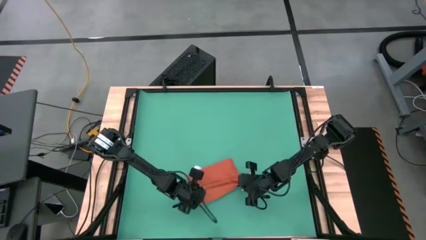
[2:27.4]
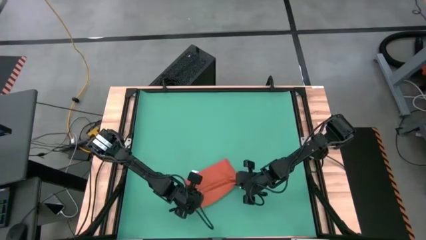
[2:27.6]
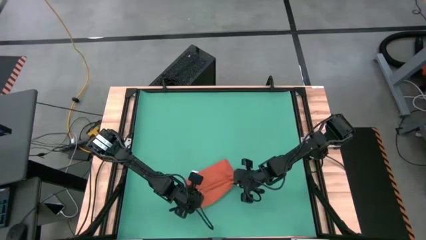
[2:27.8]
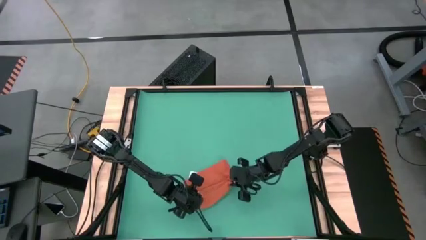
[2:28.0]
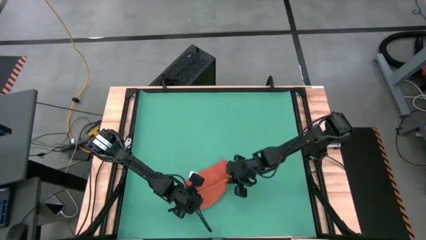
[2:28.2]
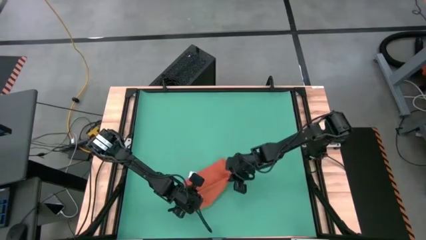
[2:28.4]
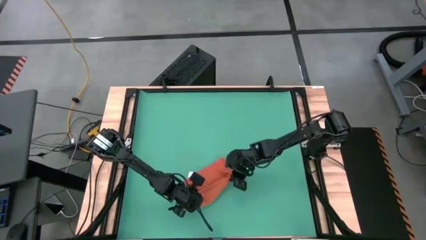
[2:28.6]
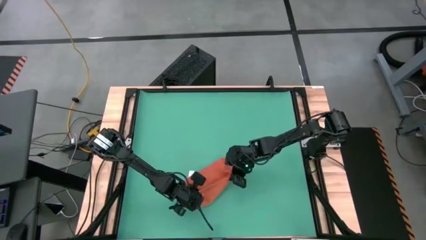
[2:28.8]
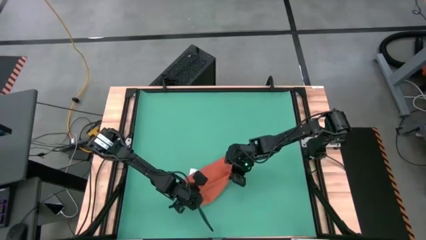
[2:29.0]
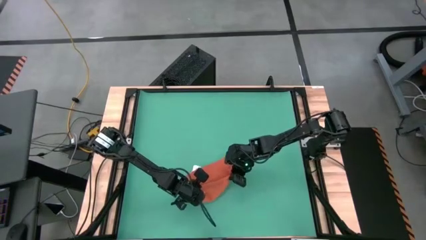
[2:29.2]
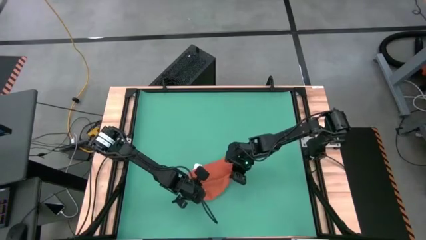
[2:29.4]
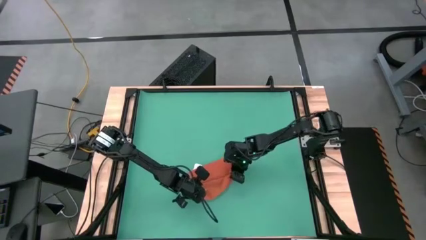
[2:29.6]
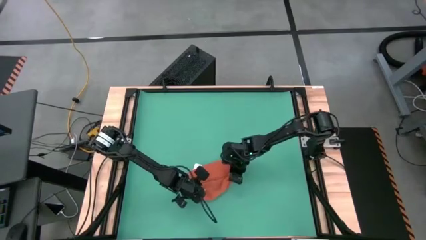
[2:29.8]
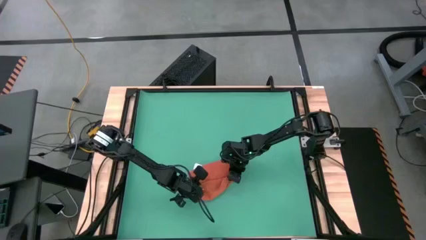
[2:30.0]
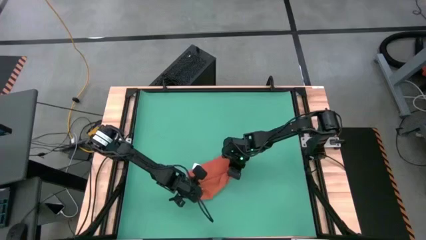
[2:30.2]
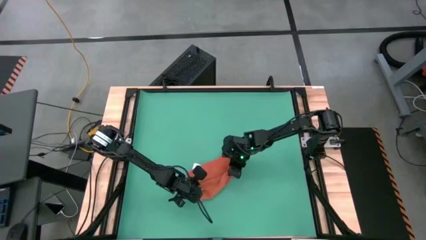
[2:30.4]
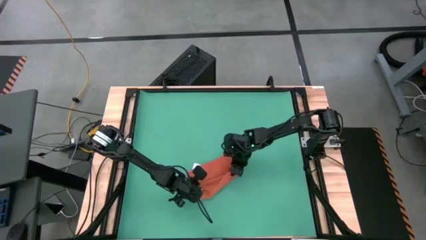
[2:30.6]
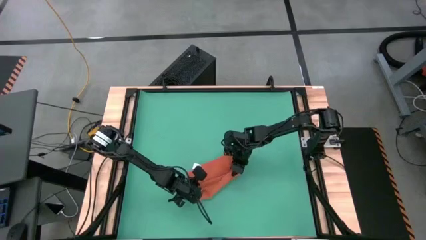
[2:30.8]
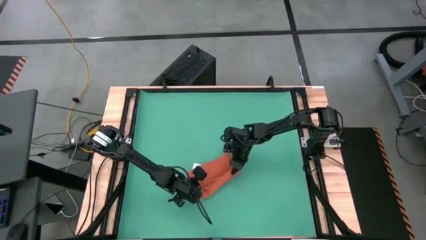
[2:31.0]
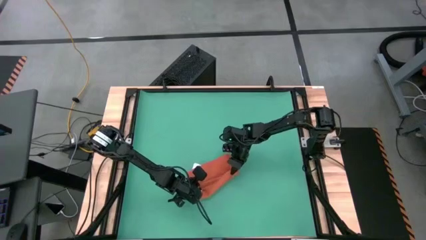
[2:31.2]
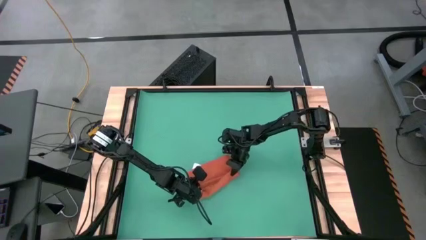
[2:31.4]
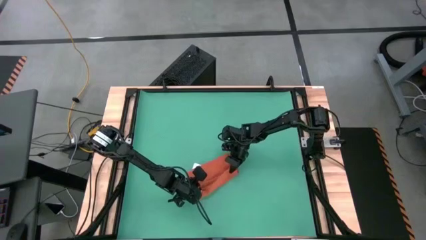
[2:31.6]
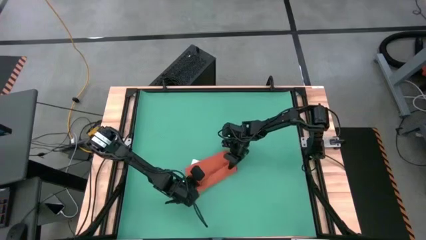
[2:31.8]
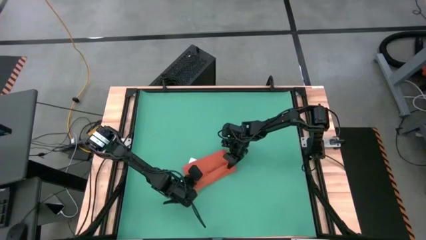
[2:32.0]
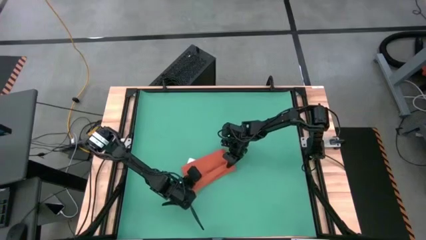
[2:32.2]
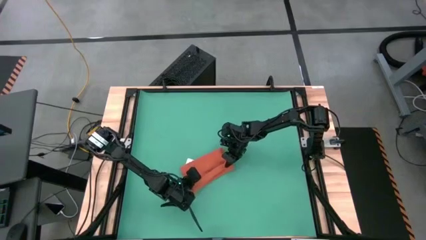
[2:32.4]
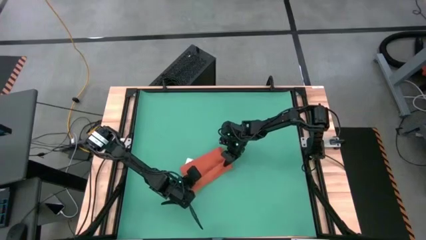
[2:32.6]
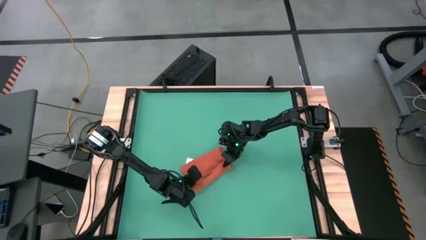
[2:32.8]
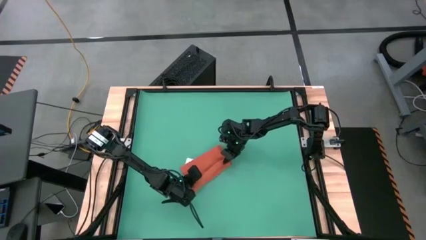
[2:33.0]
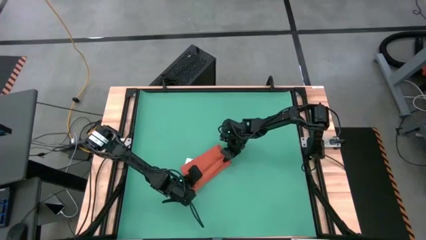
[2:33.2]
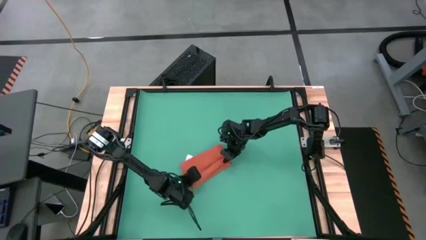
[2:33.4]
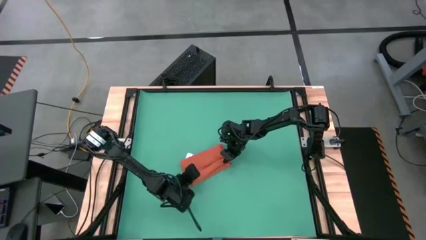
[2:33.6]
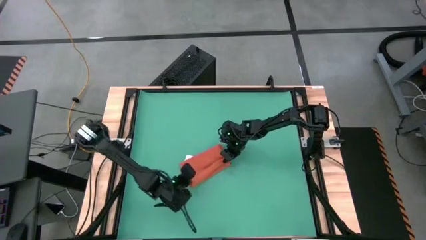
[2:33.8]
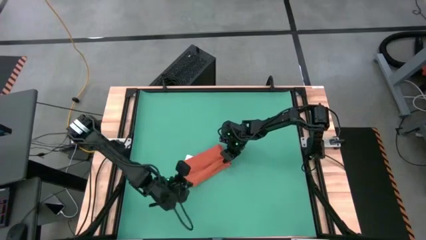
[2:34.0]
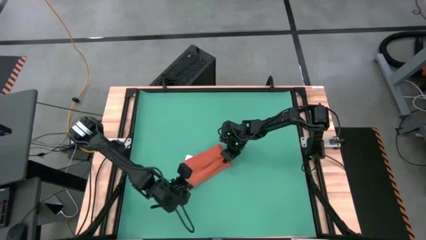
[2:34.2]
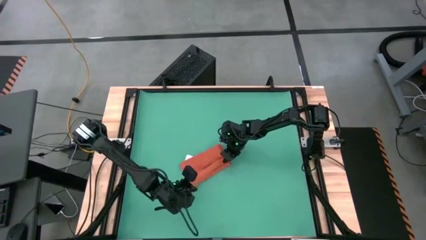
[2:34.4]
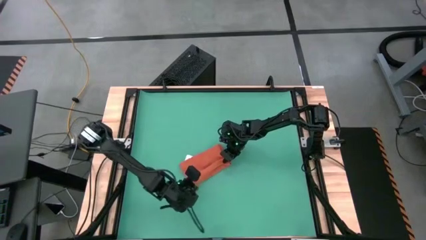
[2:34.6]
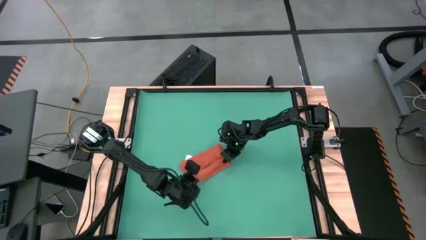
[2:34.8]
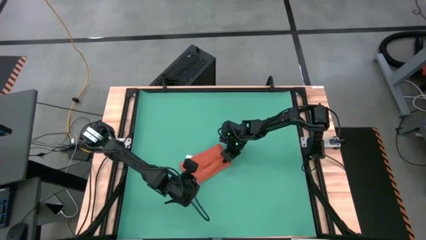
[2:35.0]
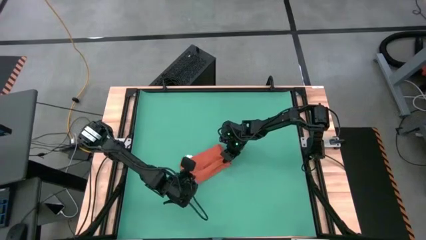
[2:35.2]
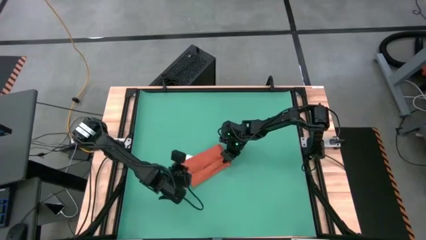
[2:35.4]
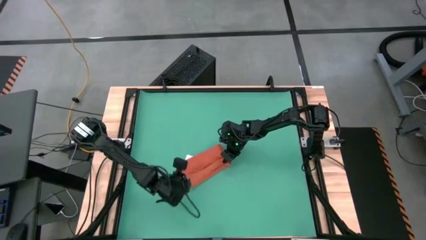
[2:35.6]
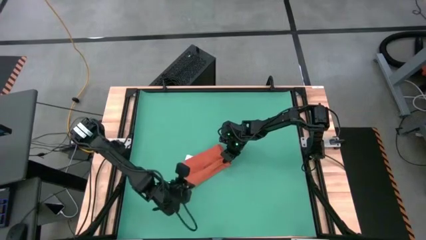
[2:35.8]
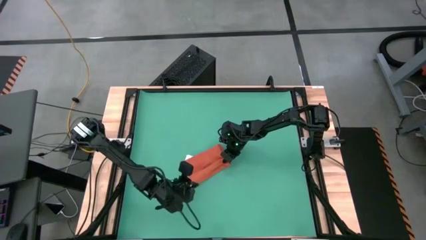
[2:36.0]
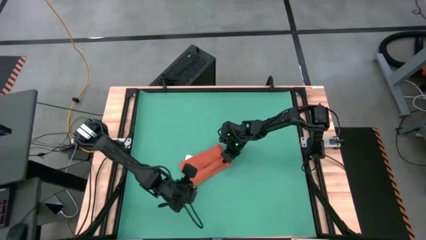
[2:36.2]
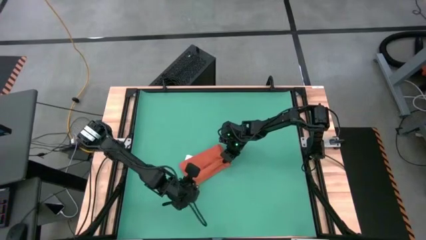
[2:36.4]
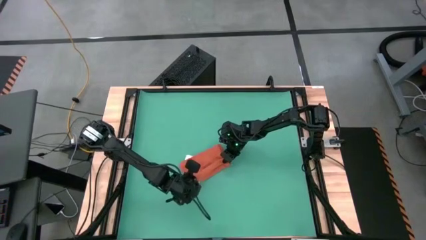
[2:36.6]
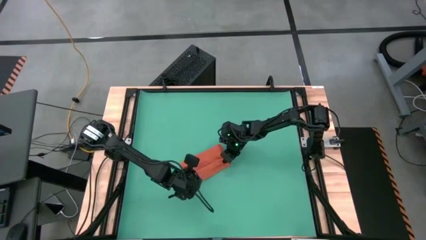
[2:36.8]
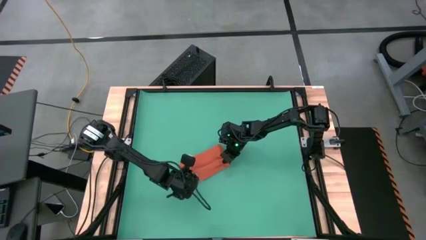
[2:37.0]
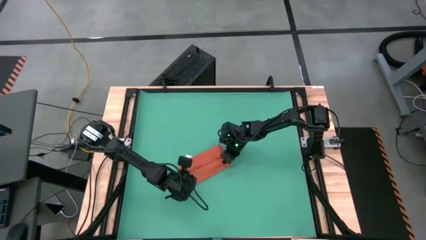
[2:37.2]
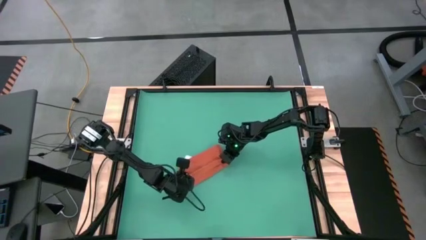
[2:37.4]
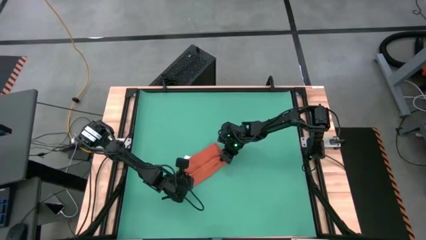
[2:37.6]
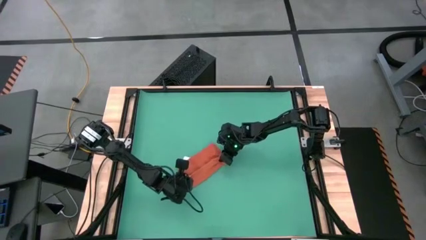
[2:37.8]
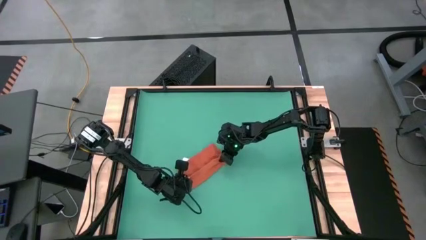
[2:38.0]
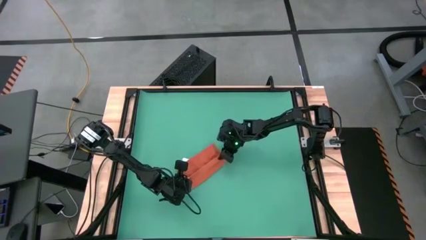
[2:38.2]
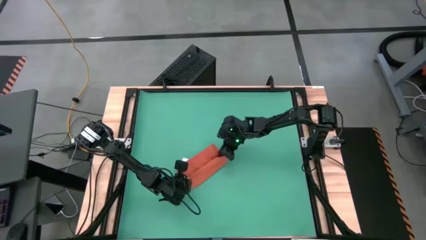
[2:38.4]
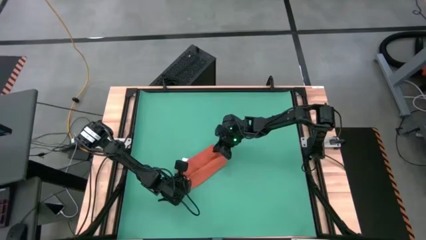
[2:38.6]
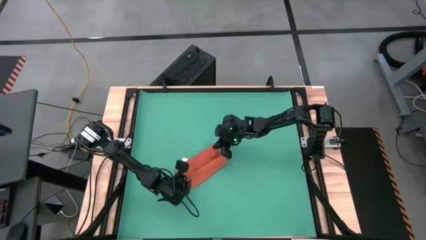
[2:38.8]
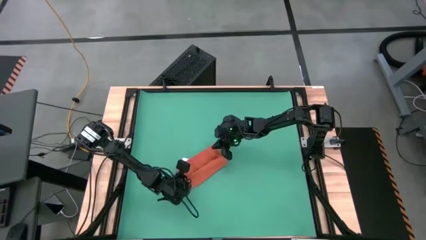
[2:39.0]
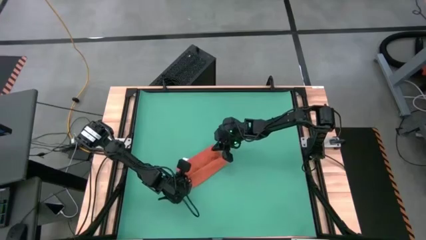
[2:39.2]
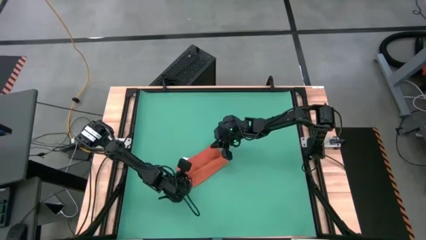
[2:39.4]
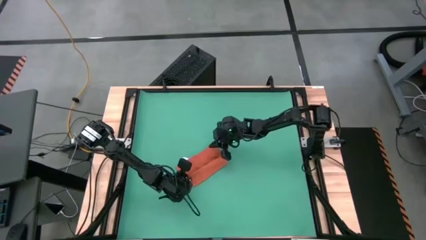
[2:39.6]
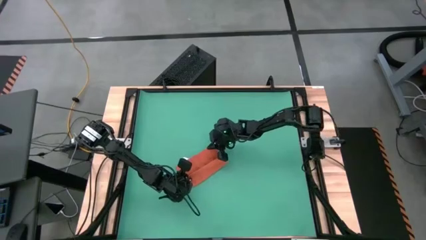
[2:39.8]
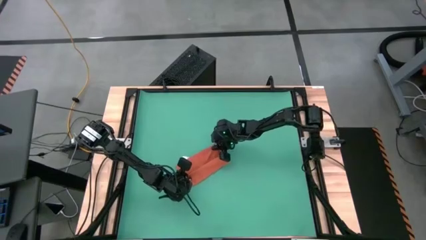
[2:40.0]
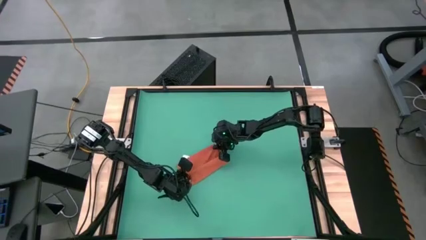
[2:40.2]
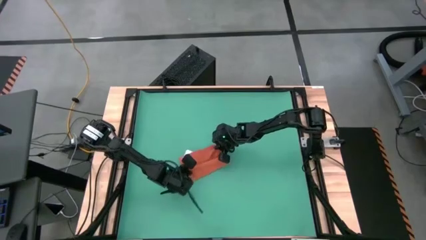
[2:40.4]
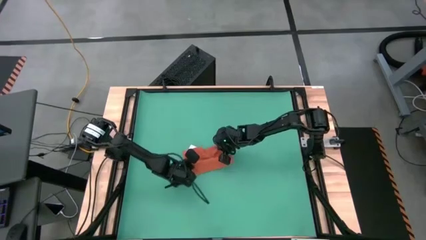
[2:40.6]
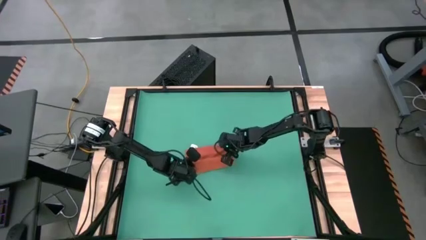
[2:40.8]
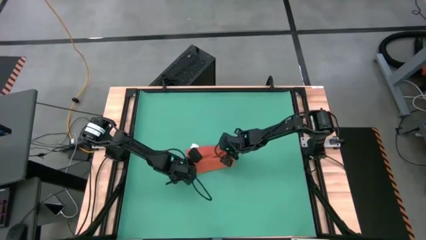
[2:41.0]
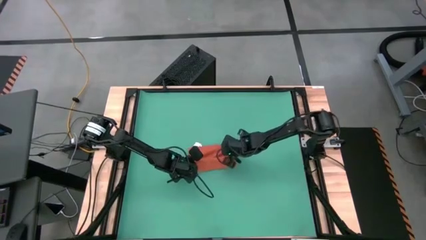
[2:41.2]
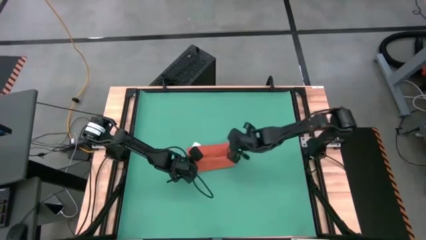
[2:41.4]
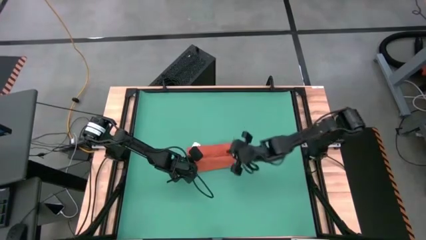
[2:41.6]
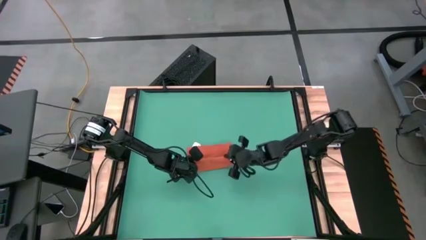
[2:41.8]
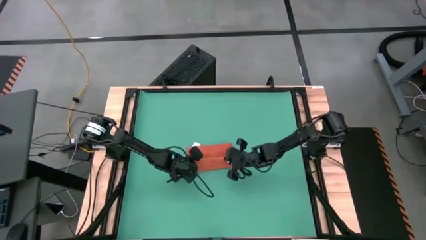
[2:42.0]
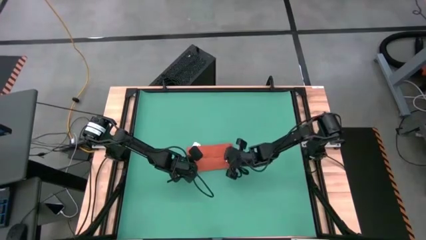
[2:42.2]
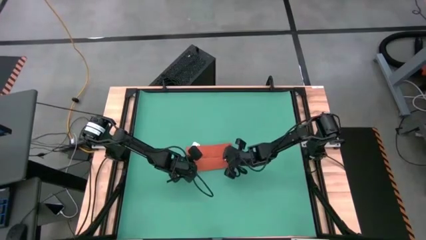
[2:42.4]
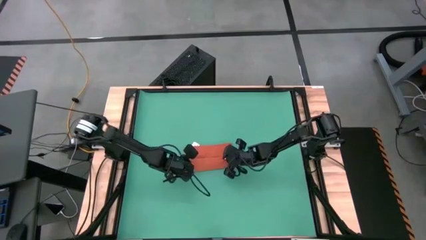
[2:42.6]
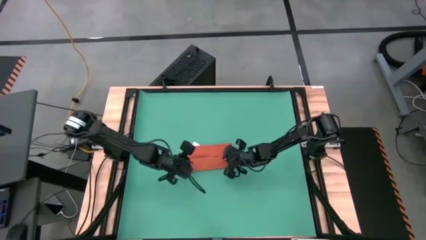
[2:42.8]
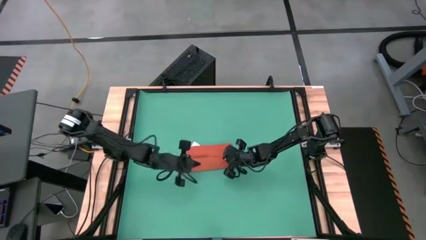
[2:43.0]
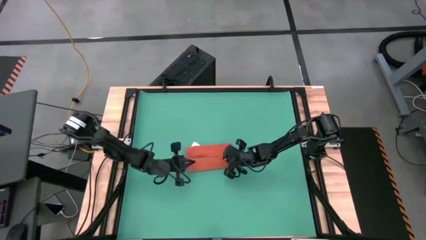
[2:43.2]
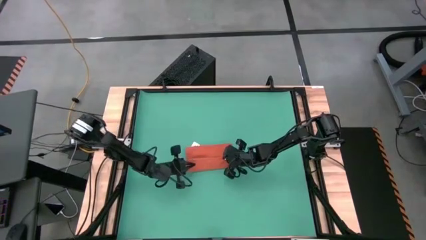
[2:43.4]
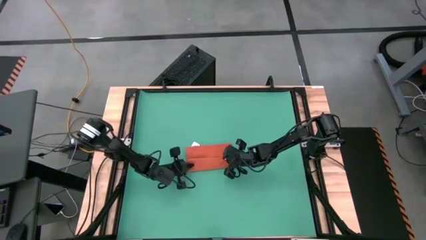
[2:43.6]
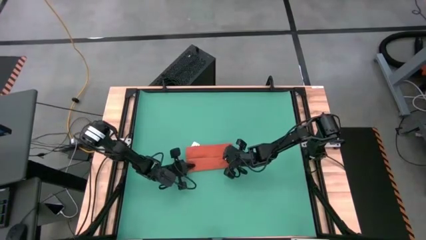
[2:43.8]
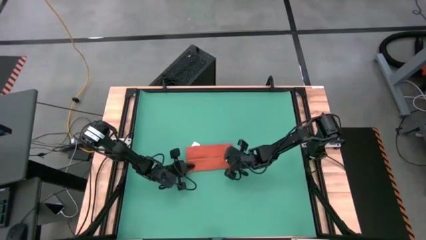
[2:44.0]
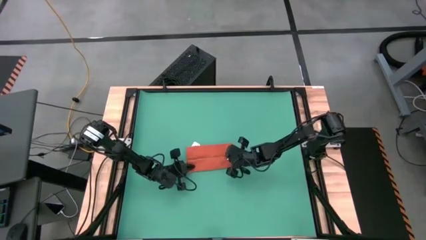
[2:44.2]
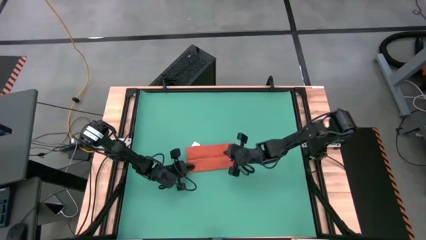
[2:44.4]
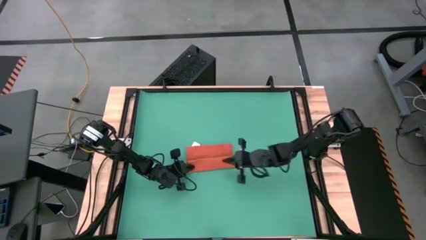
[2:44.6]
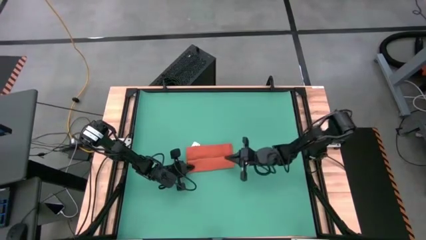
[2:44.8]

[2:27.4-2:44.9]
Task: Roll towel
Roll the orange towel
